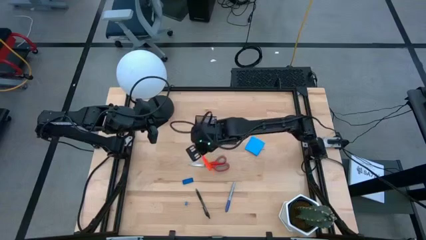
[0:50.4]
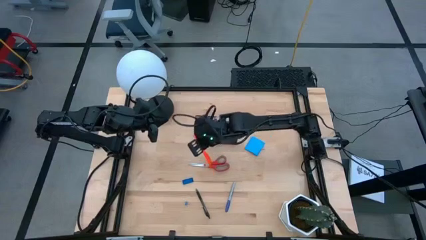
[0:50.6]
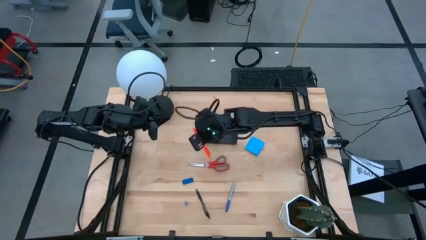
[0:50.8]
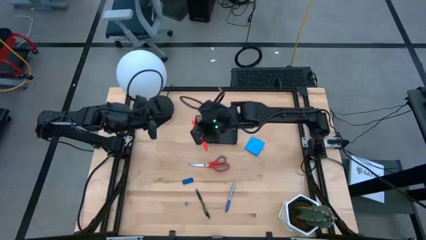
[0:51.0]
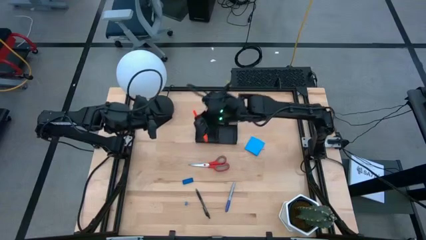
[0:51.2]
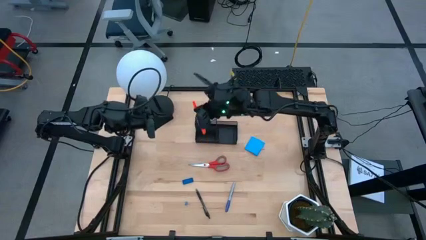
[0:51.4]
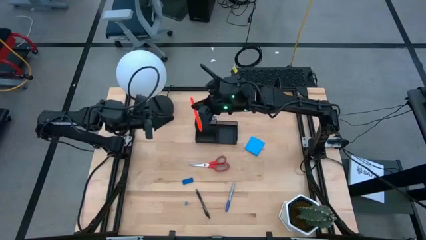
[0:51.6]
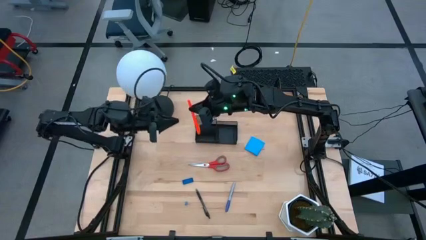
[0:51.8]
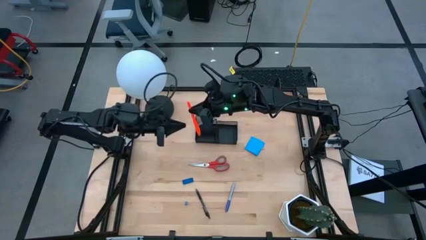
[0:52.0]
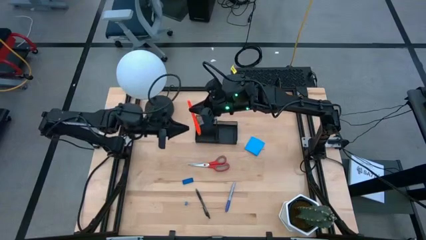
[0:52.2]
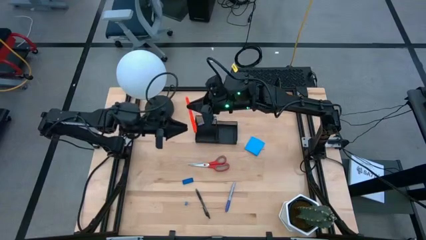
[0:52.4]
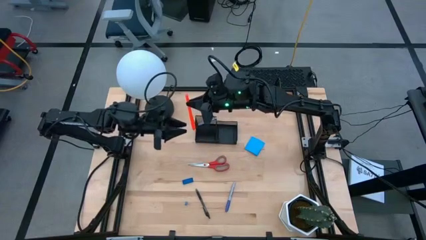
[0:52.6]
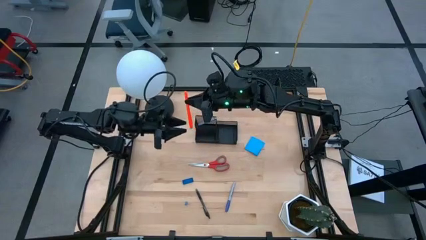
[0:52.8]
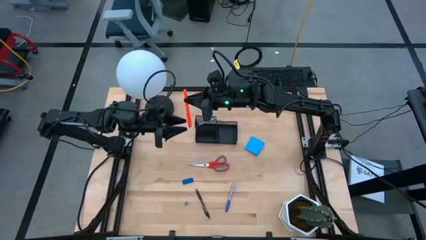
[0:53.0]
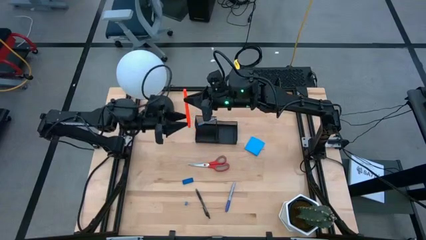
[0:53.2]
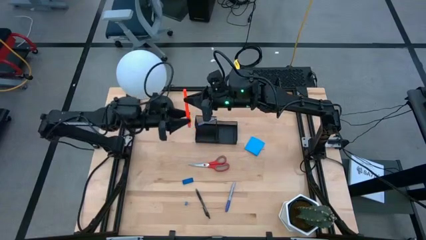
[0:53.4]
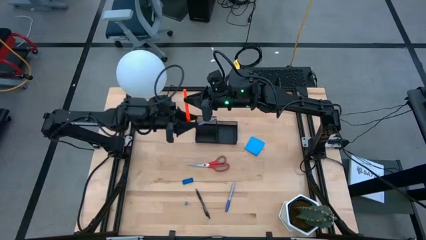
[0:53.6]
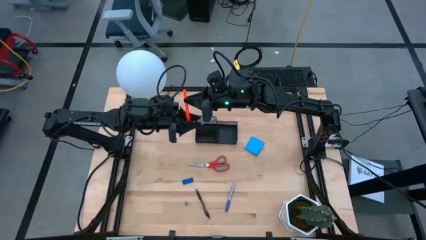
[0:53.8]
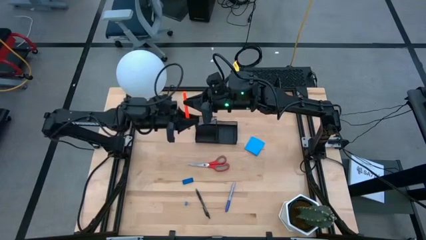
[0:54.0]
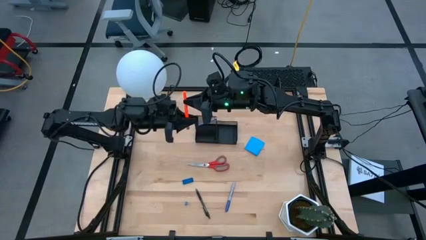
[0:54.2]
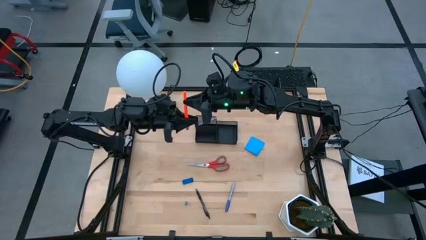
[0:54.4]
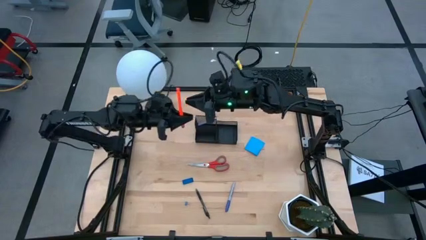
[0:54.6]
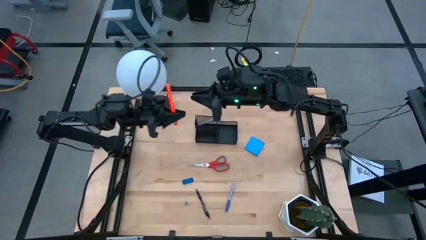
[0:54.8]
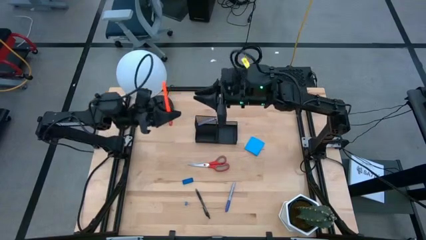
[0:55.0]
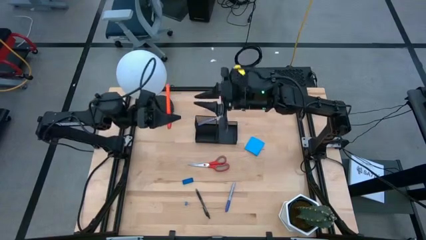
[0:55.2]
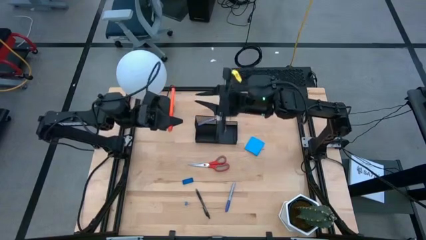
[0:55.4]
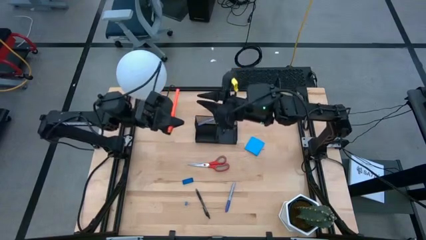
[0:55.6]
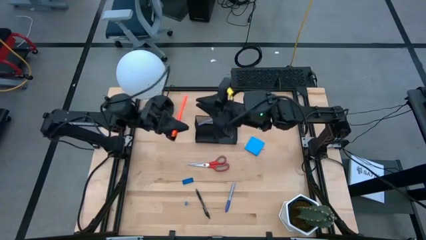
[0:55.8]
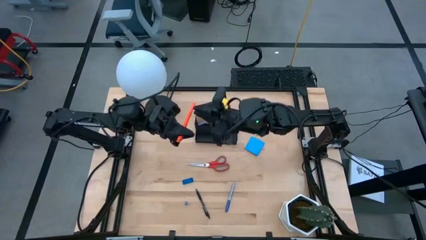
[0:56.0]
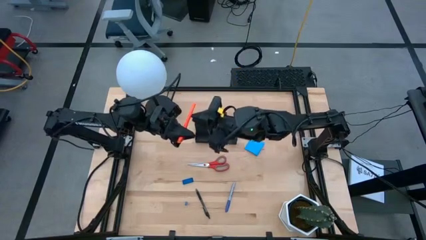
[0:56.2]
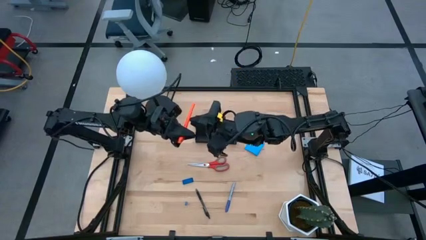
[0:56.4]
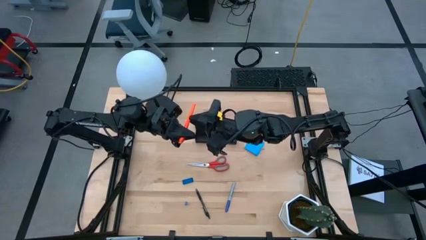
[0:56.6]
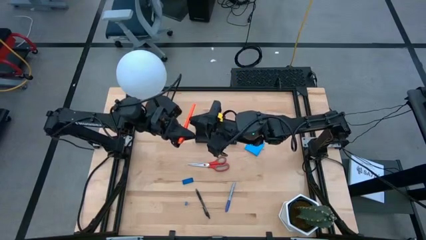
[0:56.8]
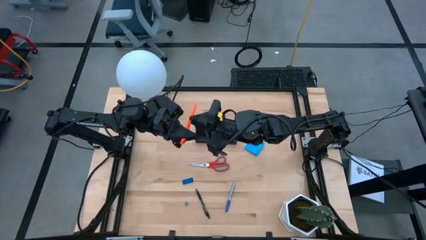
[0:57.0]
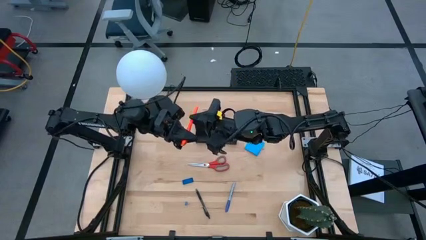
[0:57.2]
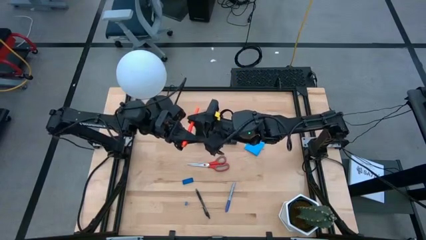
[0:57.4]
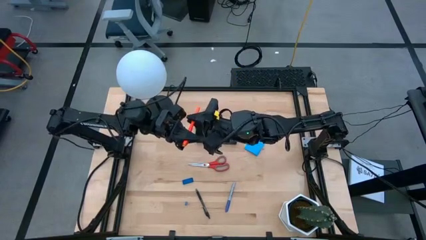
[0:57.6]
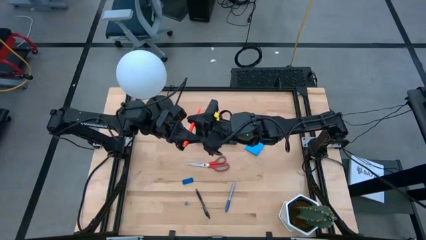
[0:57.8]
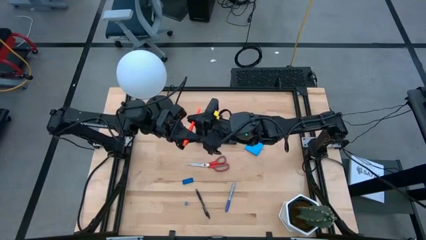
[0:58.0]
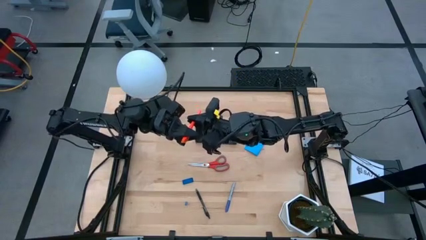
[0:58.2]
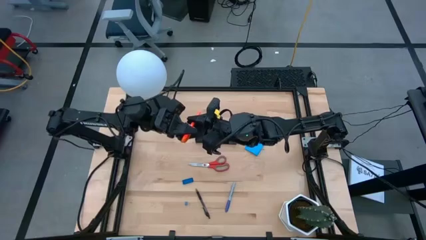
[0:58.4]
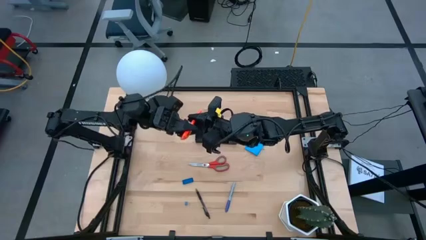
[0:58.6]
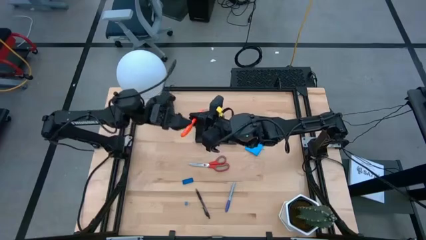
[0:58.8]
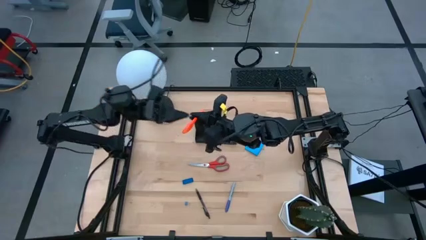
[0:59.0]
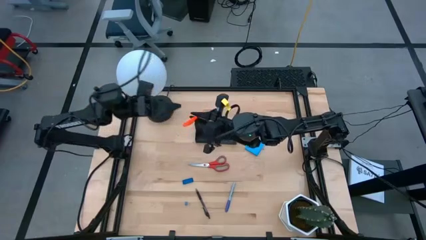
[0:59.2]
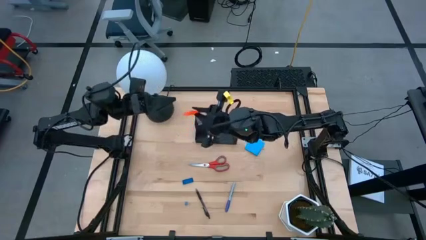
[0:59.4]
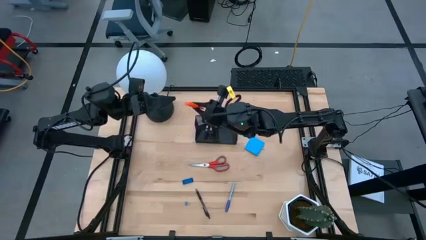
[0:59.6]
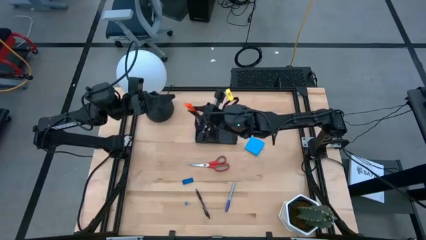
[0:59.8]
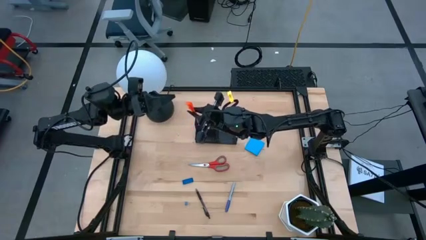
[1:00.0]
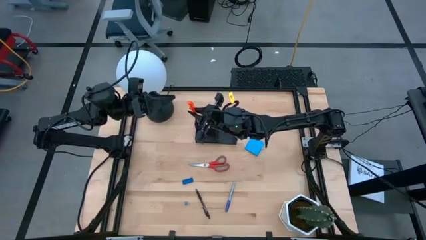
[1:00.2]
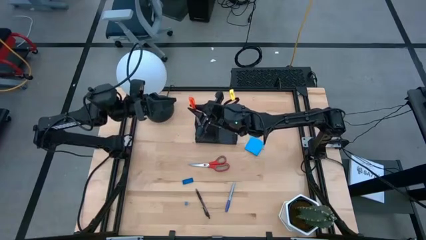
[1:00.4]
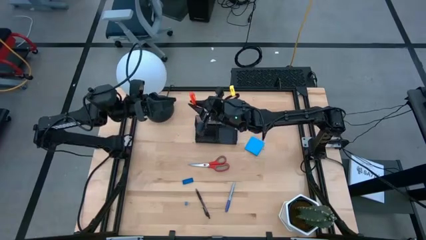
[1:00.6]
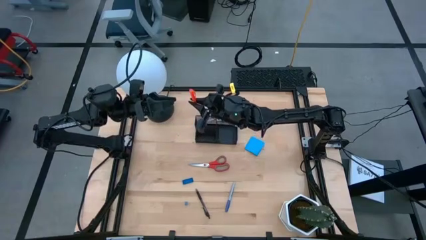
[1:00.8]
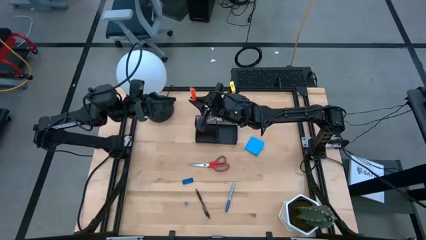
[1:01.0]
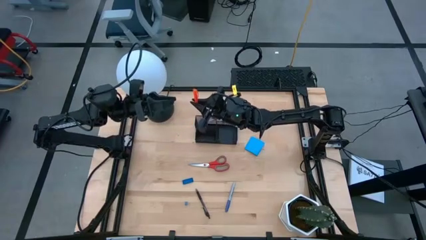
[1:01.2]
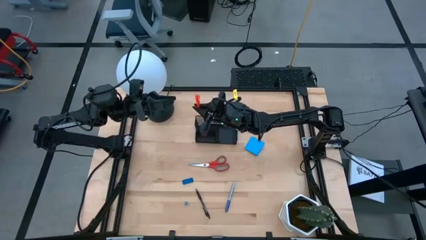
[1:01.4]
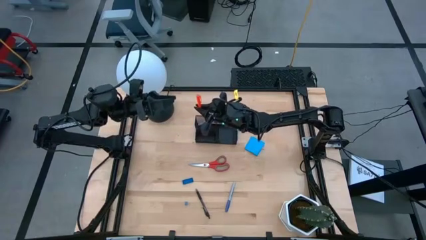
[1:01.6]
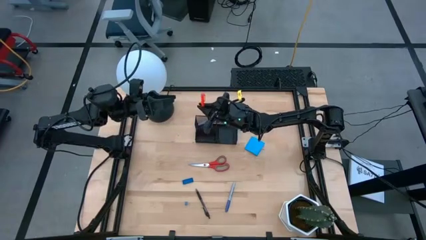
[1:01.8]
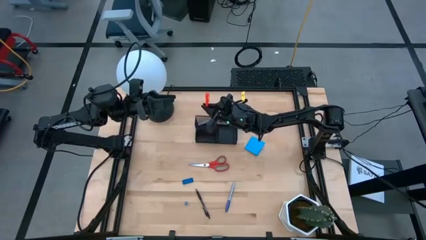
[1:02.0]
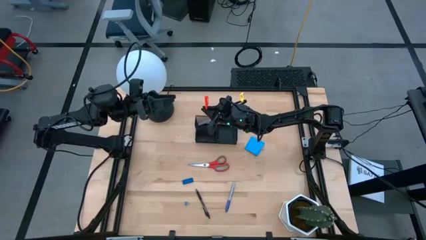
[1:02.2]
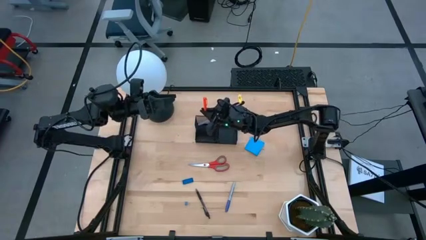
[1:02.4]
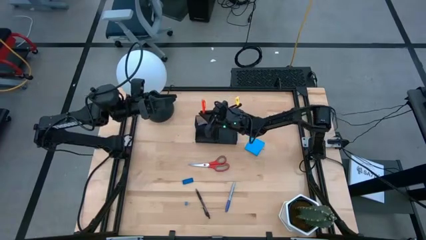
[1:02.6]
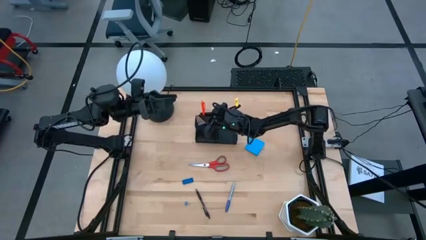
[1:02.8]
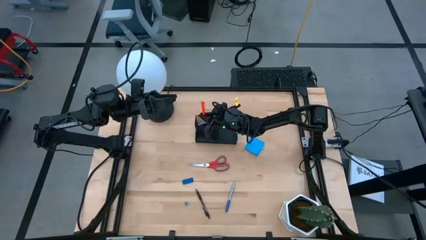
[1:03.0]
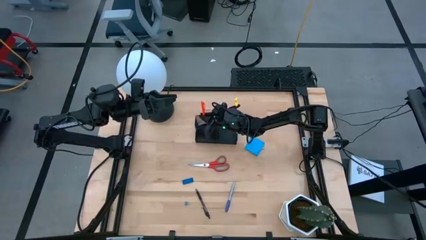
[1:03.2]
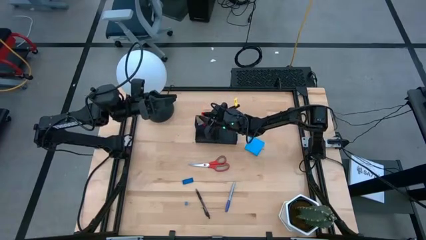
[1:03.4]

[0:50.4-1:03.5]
Task: Pick and place office supplies into organizer
Put the orange pen into the black desk organizer

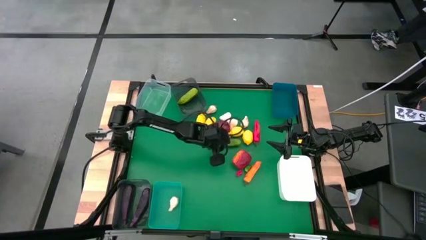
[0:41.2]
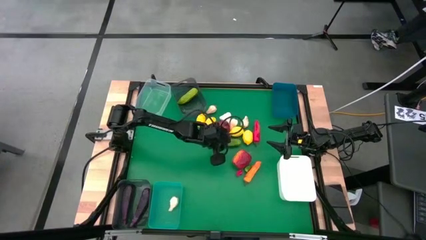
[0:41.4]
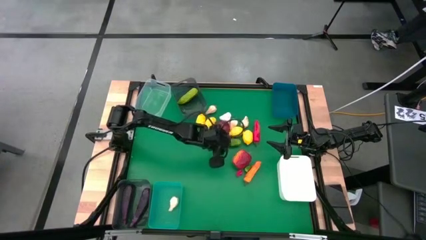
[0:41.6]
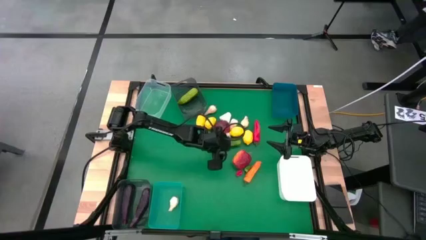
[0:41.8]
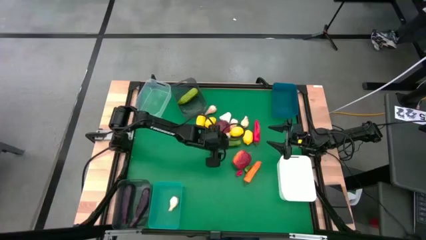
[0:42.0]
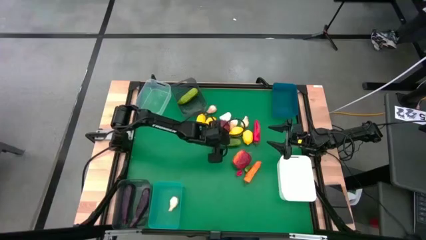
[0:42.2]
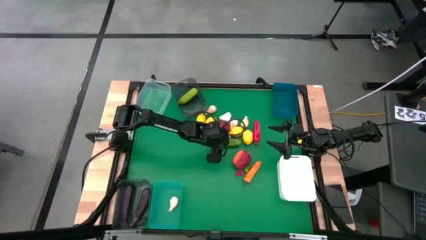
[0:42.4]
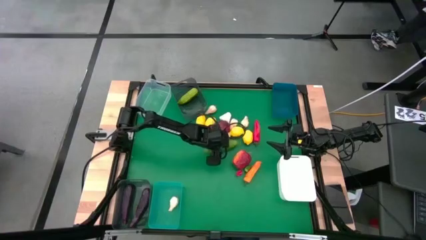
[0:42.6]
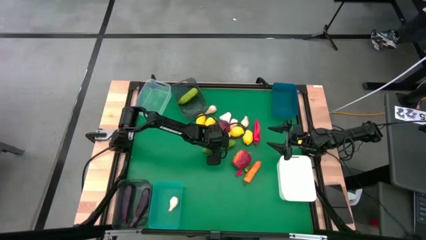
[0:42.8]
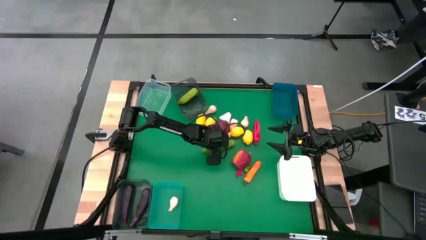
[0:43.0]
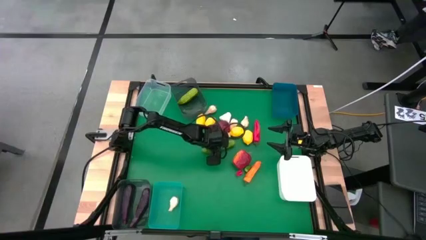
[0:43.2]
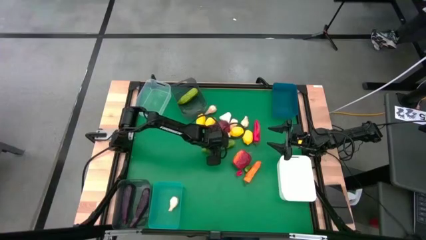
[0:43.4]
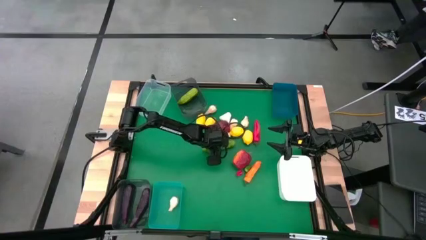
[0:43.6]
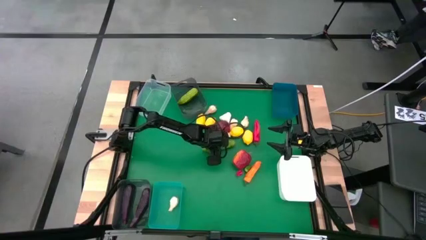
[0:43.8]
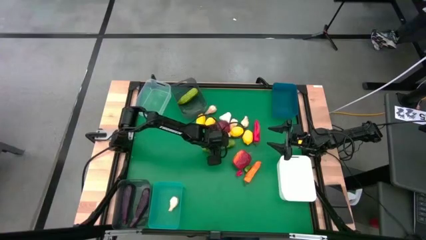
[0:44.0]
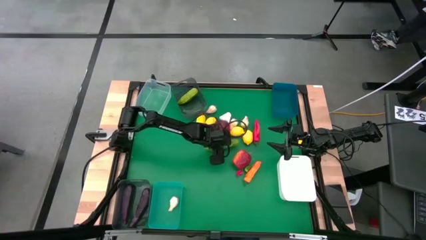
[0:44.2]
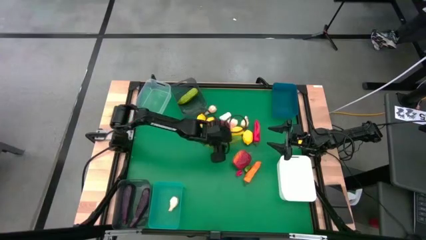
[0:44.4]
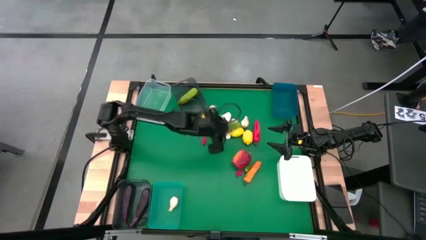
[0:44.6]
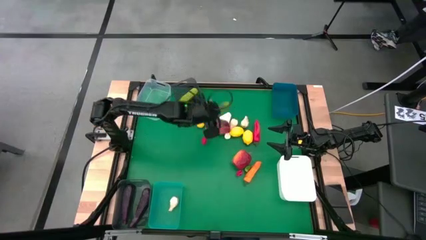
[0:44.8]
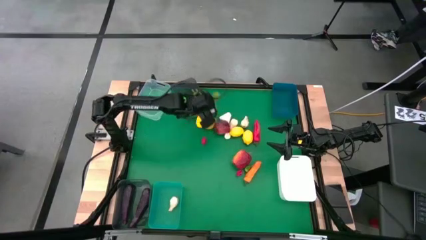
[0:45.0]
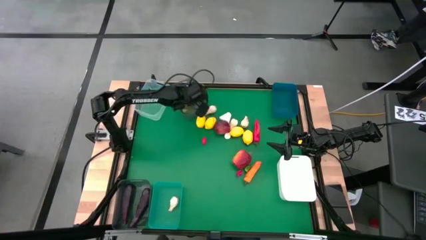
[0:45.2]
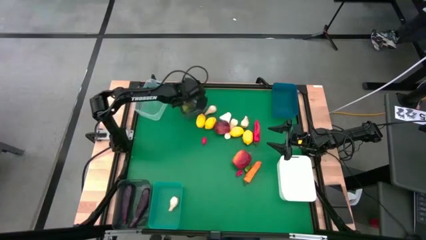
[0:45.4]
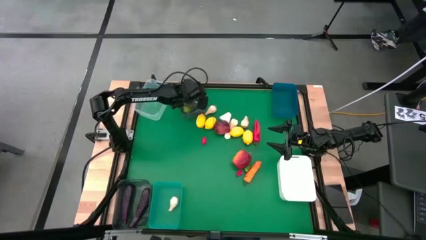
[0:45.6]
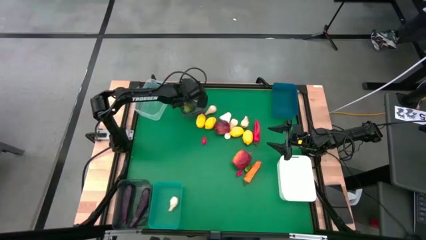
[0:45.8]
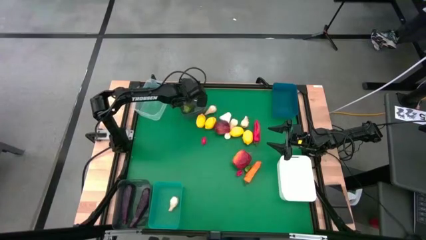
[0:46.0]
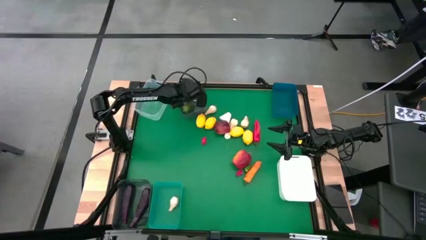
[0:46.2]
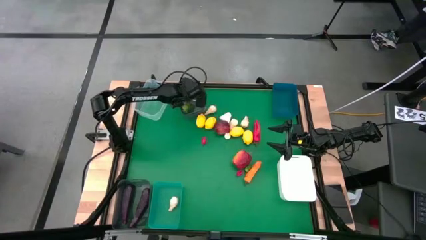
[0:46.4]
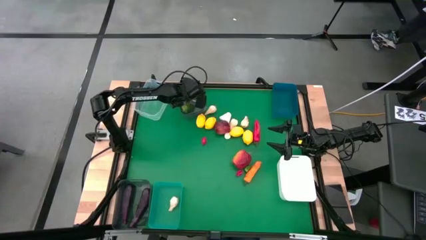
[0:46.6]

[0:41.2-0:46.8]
Task: Sort produce into baskets
Put the cucumber into the top black bin
